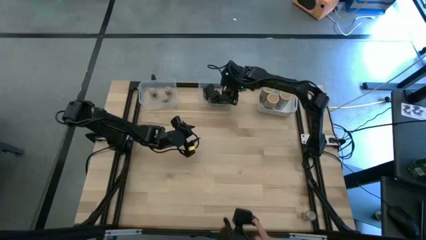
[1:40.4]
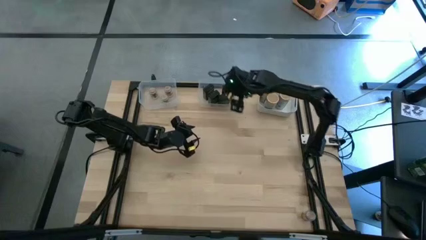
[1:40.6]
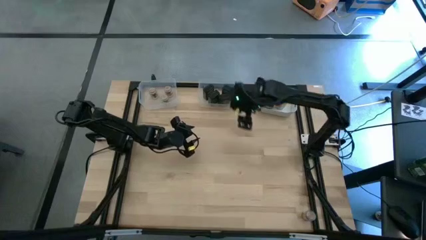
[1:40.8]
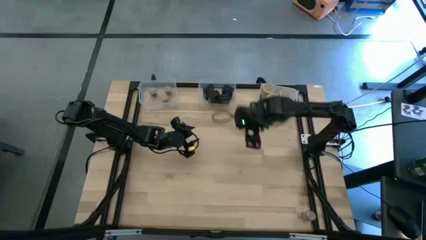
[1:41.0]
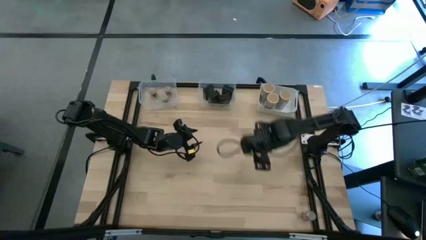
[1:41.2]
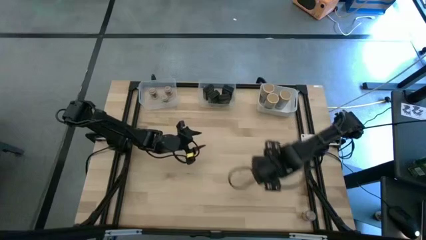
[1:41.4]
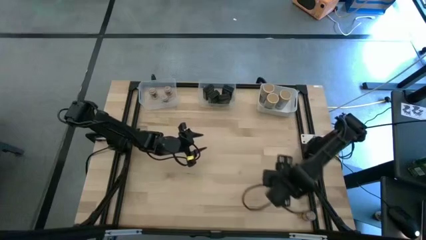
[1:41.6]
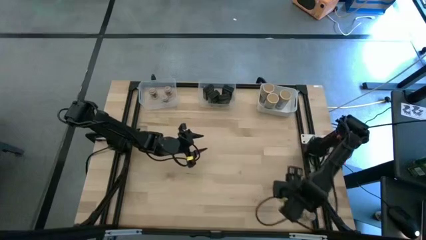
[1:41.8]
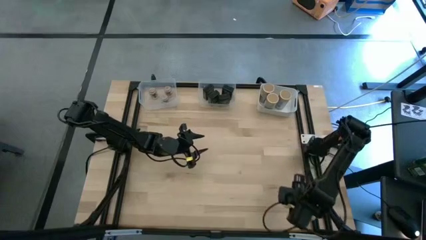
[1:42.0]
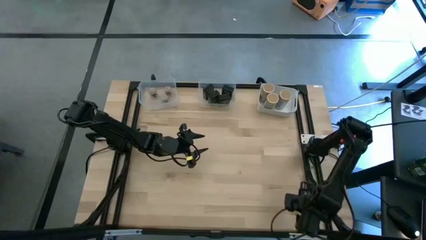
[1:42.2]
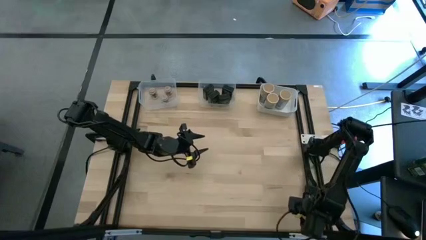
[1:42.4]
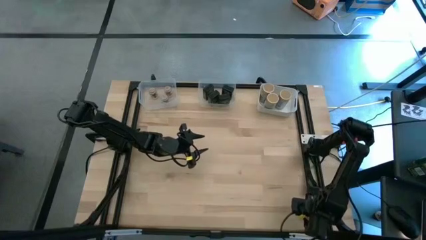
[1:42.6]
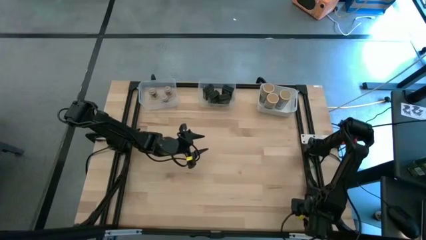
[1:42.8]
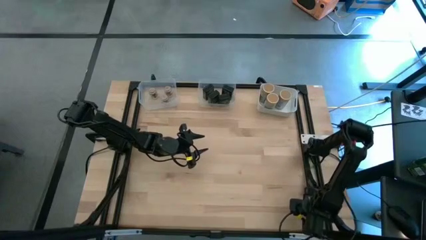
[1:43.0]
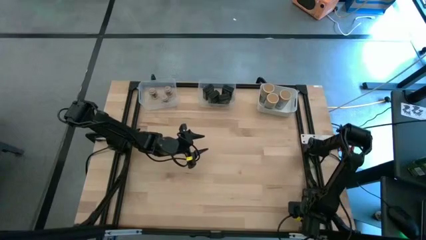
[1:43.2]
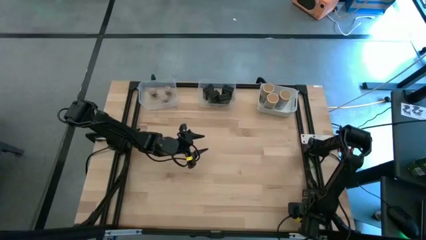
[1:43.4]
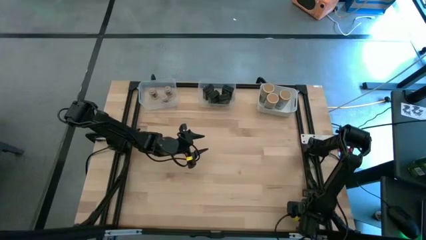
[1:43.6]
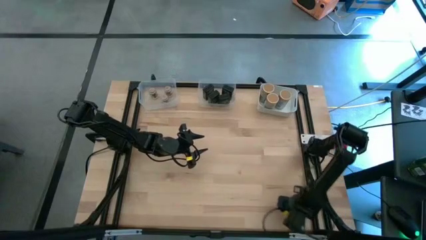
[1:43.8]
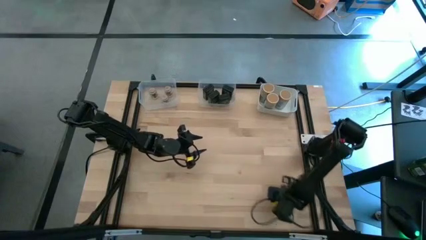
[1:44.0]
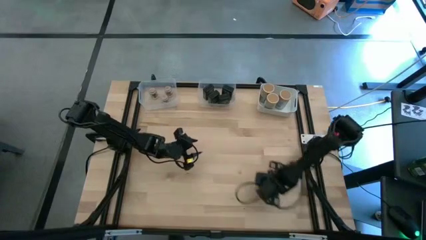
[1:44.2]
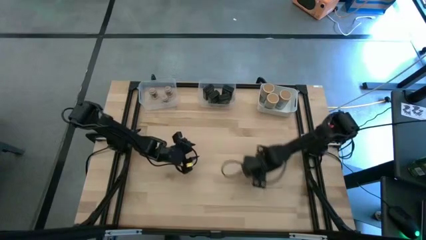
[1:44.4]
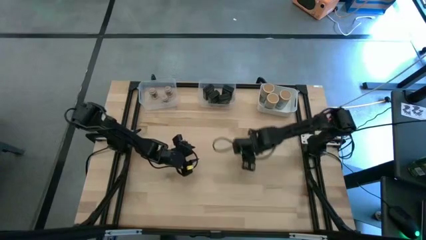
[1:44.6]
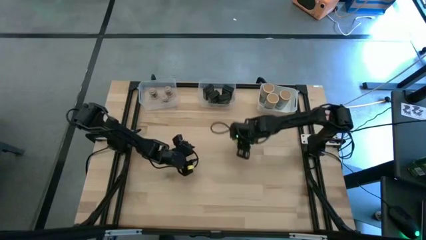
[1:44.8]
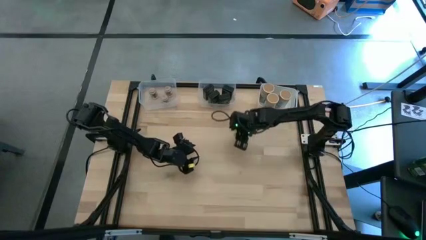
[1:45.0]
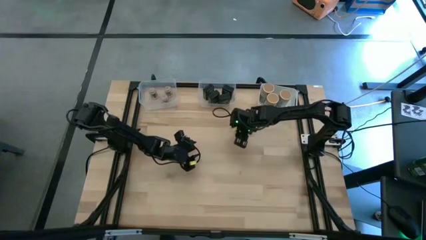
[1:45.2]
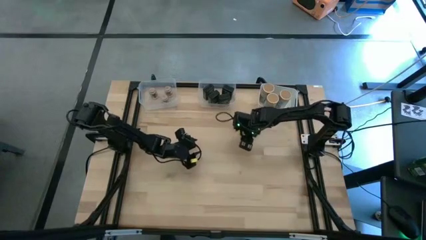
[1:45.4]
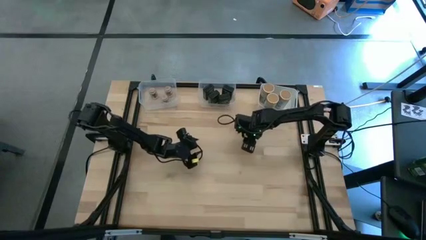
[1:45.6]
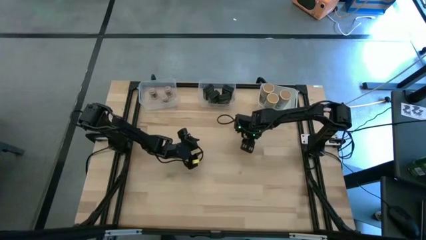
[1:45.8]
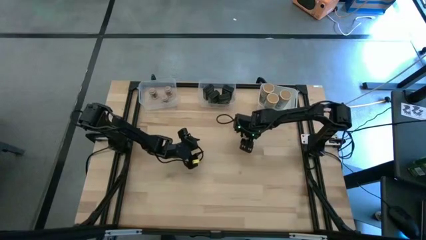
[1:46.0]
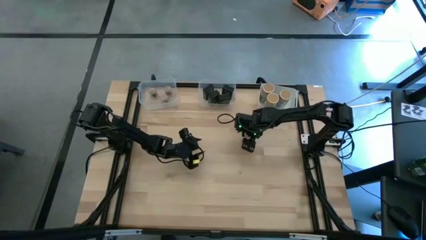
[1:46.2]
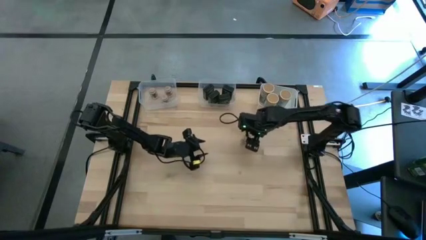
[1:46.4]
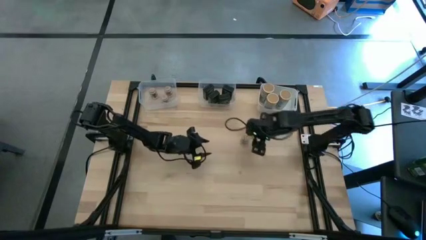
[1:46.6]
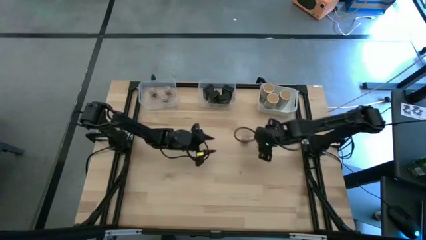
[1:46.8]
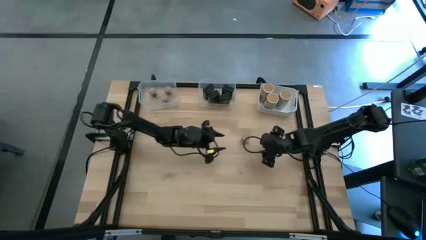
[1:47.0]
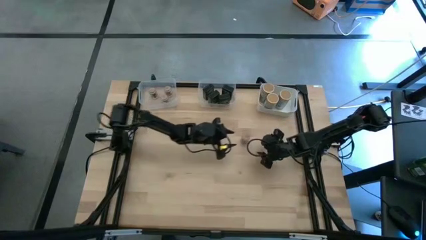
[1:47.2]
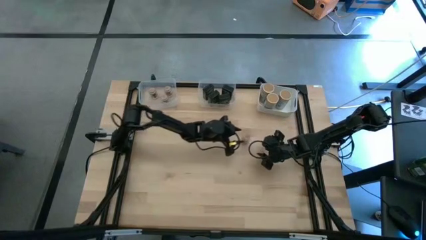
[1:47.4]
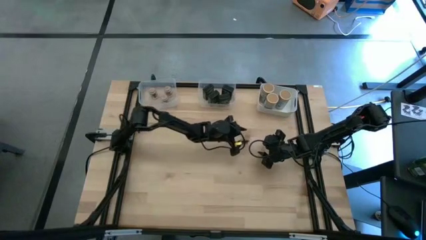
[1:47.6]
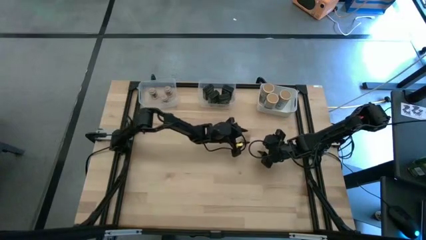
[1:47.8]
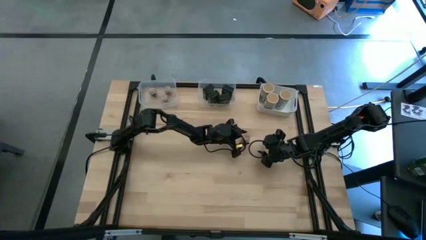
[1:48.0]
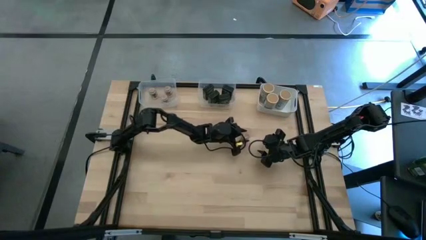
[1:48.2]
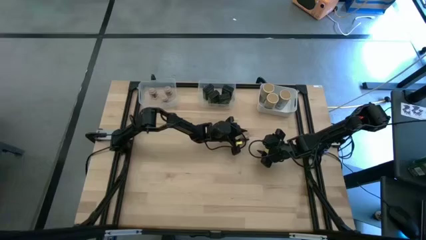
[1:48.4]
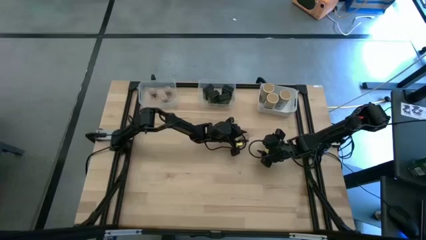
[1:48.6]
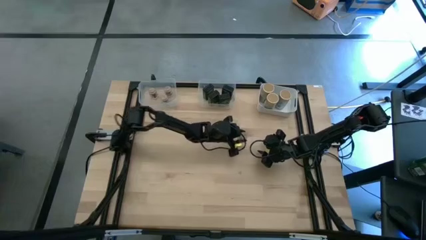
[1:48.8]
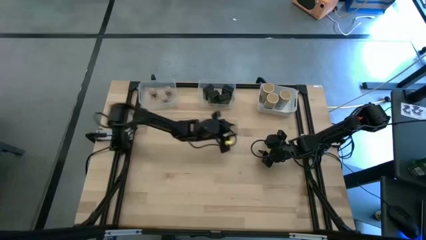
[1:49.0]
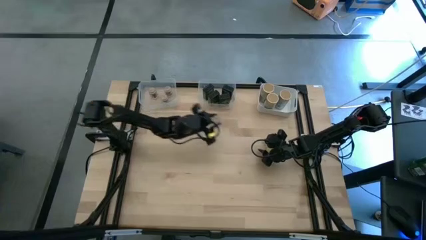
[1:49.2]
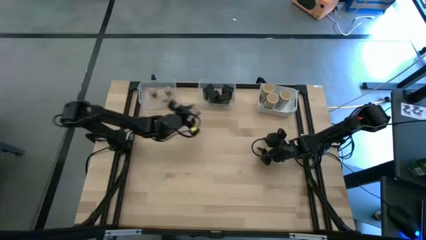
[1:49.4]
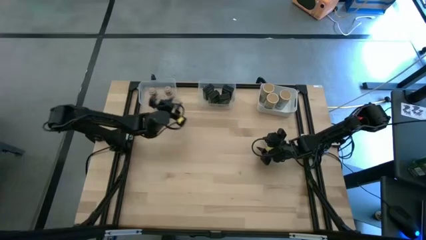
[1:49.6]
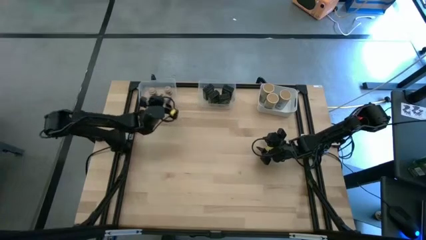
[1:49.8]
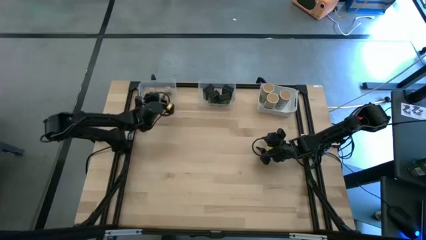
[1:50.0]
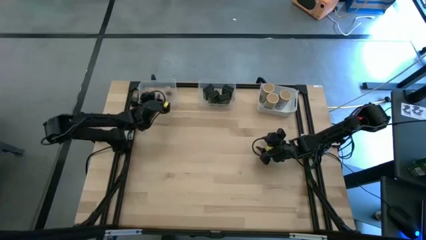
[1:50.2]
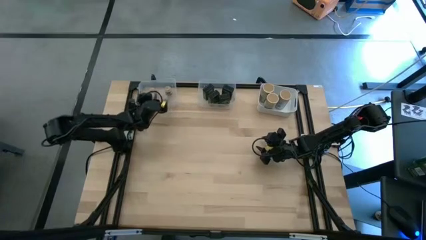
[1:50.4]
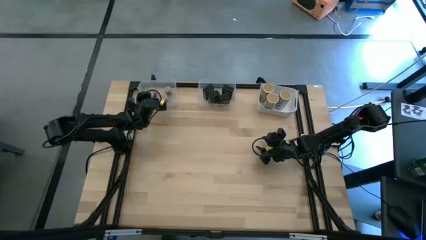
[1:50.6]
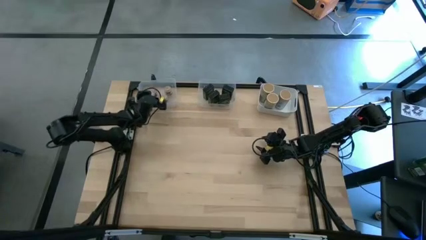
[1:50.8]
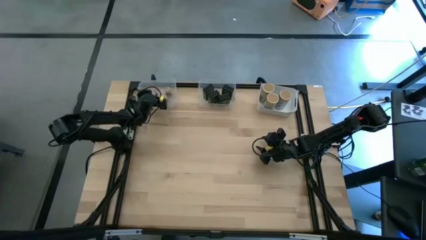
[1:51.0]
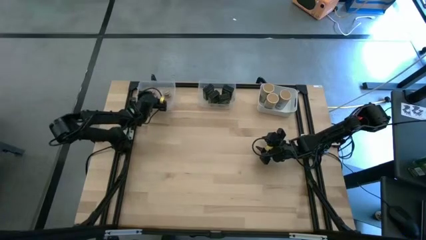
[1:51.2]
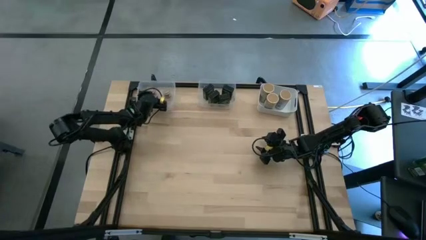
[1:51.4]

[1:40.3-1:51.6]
Task: Sort spices by type
Put the brown seasoning bottle into the left transparent bin

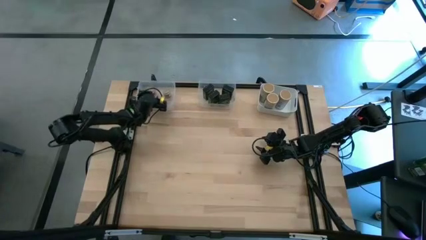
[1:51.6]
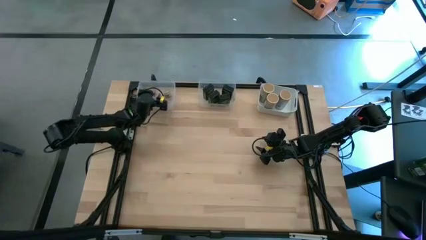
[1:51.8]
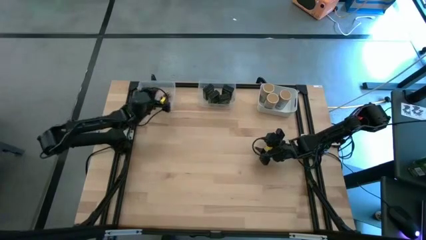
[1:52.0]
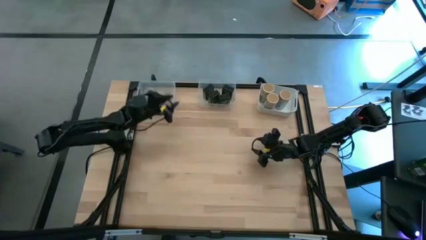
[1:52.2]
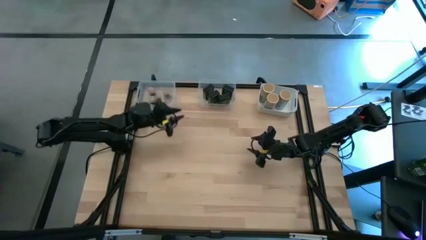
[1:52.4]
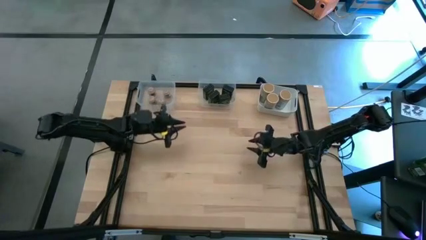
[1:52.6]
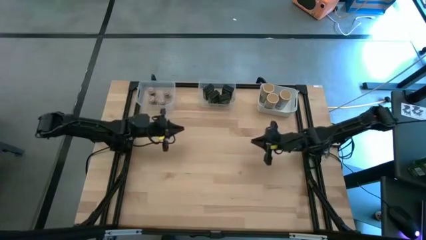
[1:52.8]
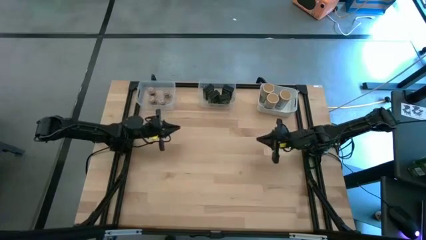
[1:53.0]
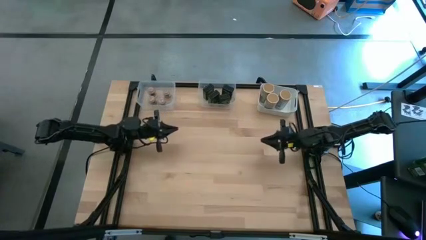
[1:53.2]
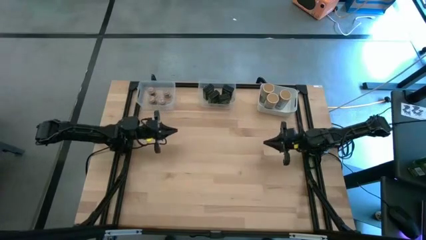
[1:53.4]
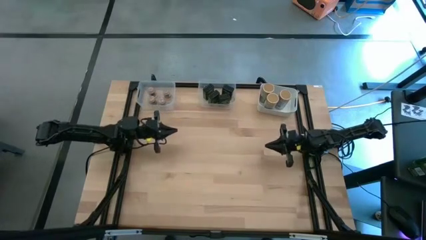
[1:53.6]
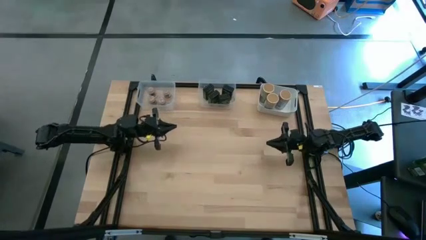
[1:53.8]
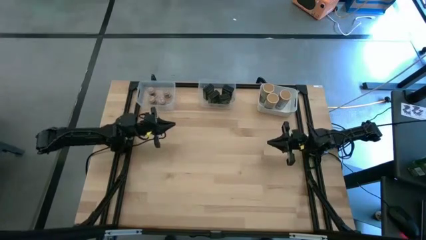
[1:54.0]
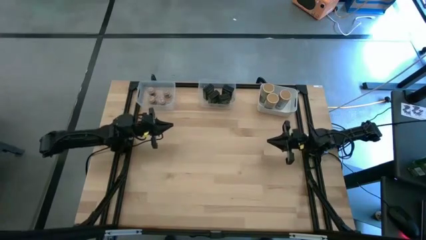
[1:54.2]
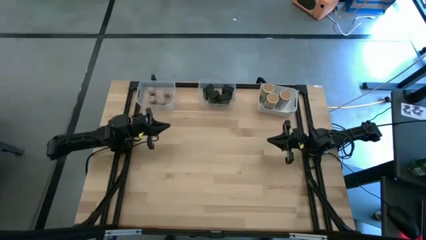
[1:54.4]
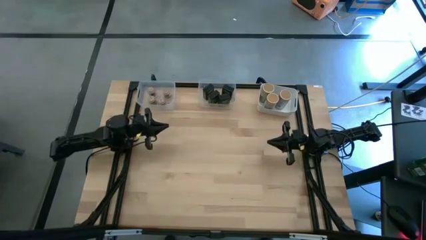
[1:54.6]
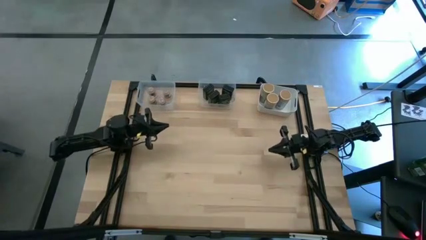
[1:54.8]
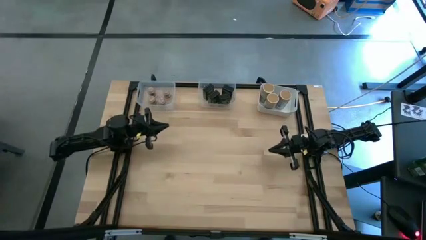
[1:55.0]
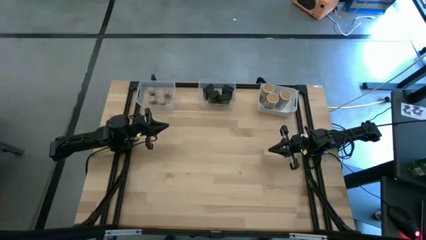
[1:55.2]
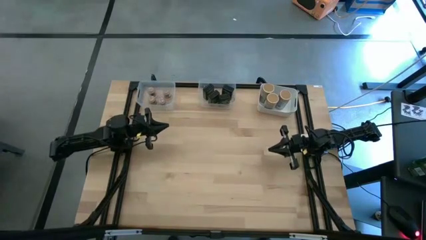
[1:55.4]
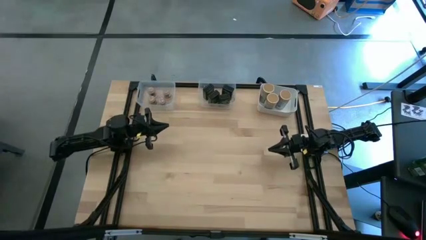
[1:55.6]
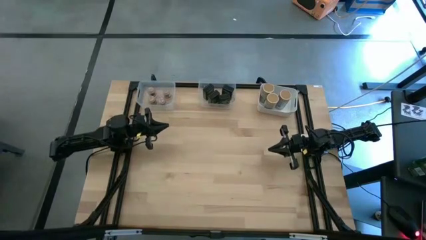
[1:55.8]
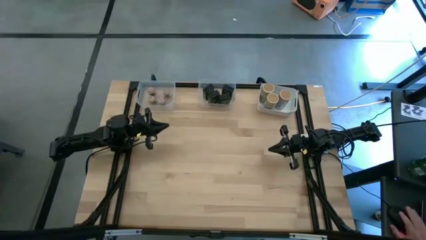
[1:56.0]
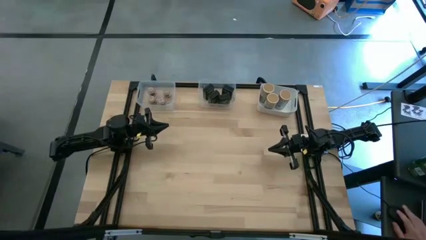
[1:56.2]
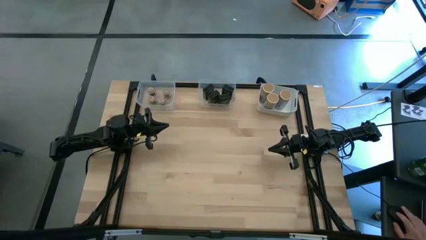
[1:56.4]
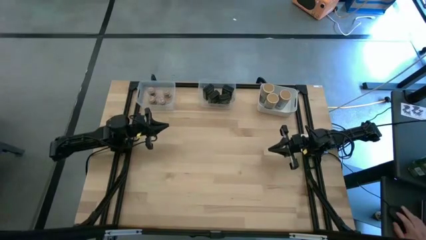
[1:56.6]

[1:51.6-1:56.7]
Return to Home Position
